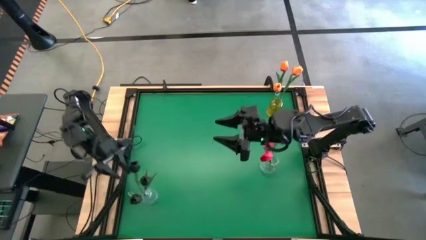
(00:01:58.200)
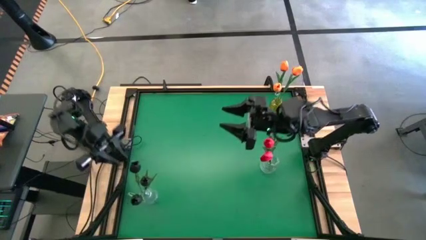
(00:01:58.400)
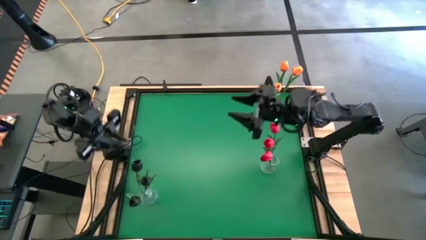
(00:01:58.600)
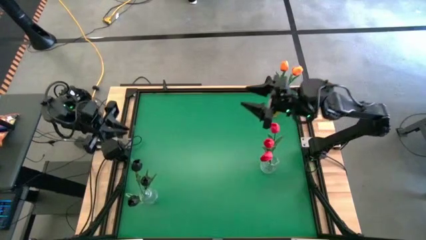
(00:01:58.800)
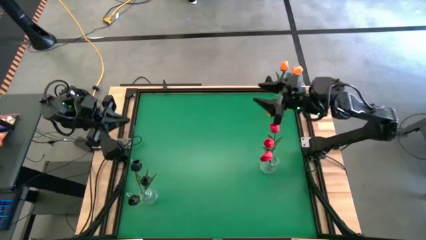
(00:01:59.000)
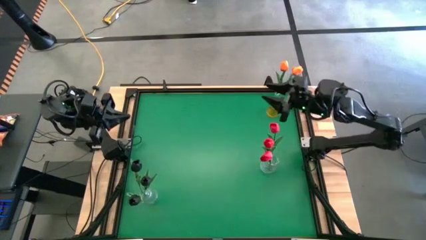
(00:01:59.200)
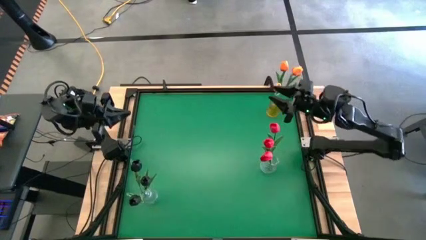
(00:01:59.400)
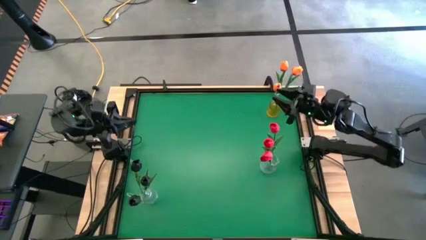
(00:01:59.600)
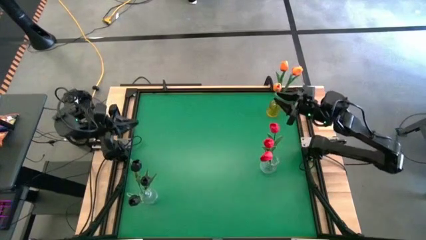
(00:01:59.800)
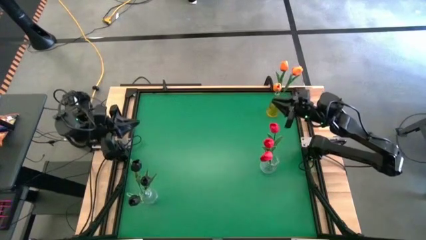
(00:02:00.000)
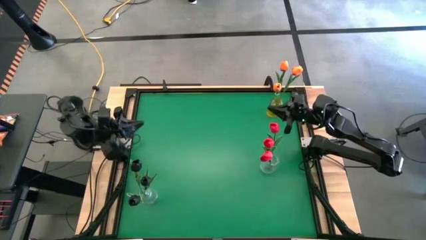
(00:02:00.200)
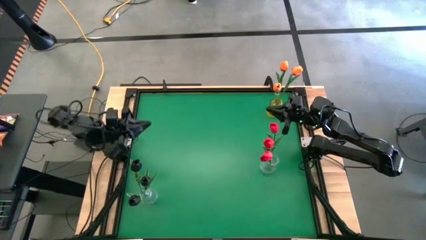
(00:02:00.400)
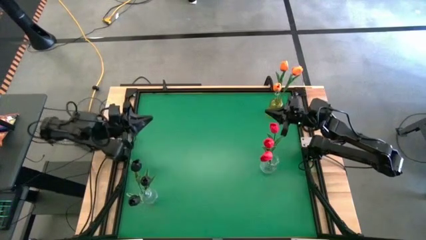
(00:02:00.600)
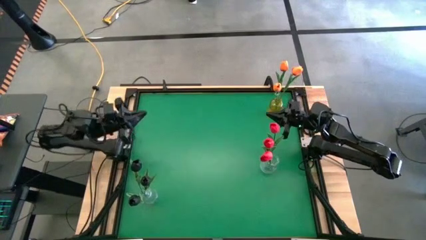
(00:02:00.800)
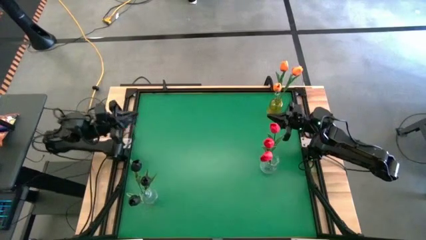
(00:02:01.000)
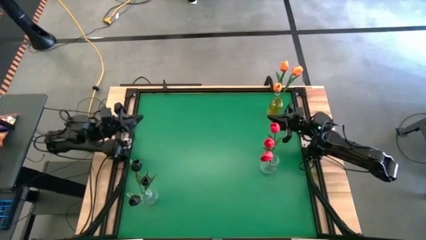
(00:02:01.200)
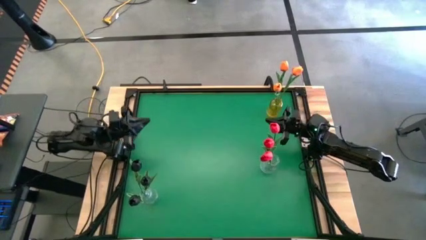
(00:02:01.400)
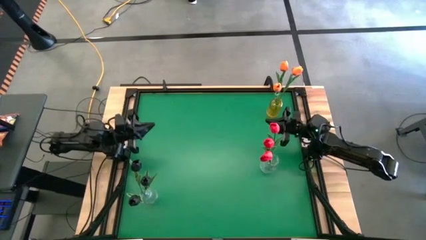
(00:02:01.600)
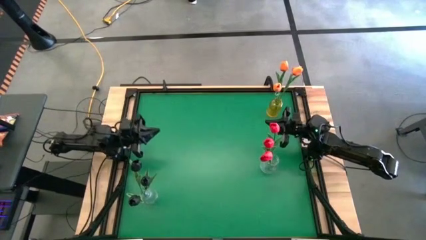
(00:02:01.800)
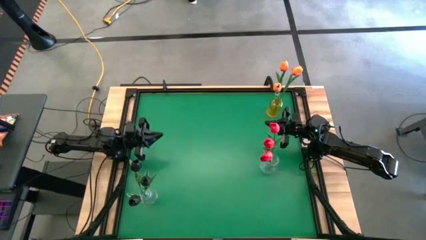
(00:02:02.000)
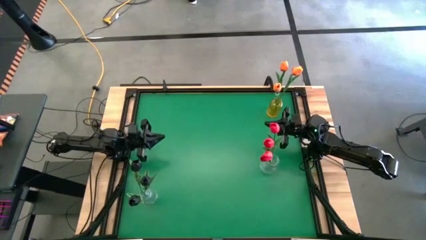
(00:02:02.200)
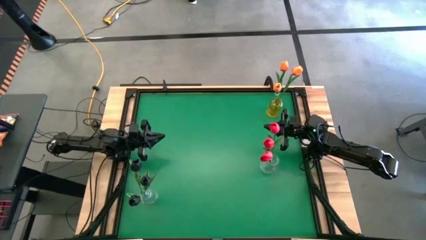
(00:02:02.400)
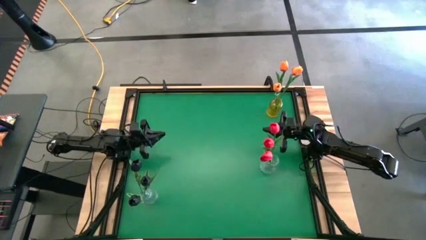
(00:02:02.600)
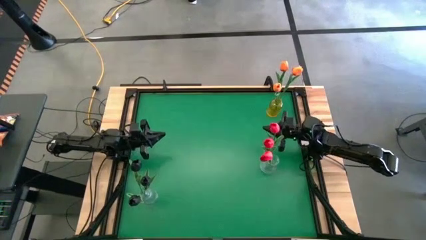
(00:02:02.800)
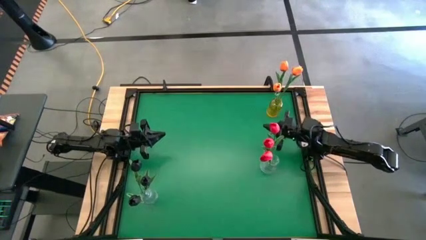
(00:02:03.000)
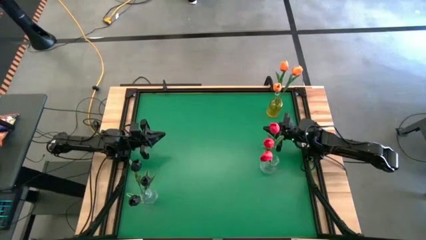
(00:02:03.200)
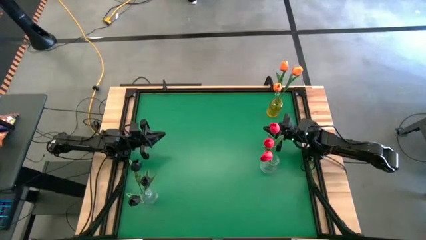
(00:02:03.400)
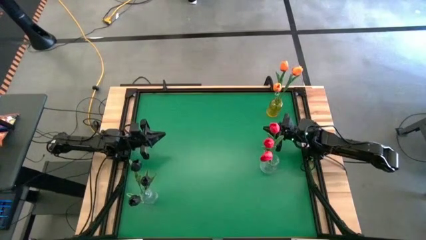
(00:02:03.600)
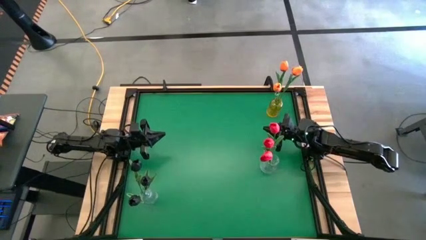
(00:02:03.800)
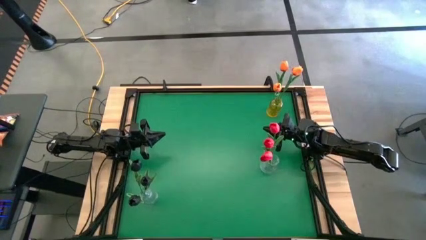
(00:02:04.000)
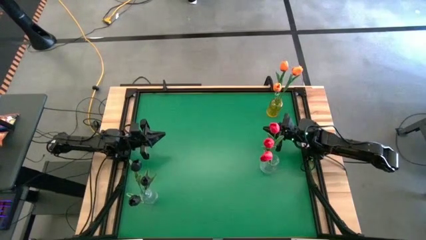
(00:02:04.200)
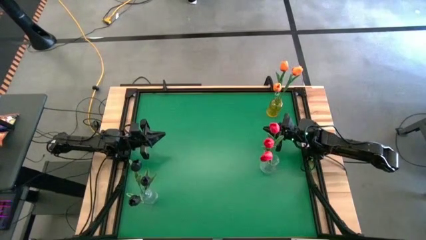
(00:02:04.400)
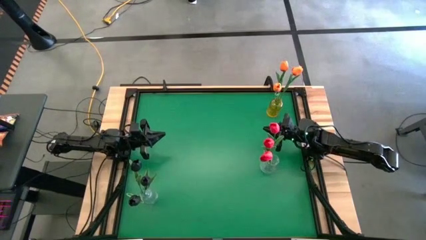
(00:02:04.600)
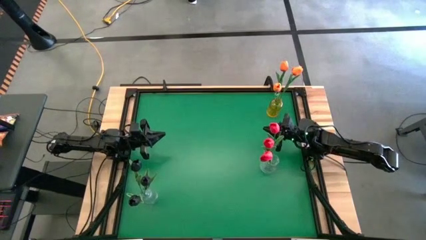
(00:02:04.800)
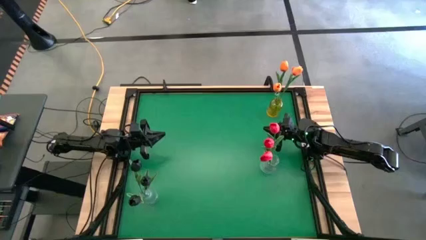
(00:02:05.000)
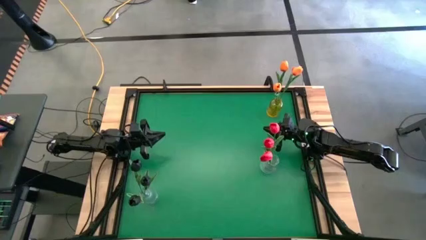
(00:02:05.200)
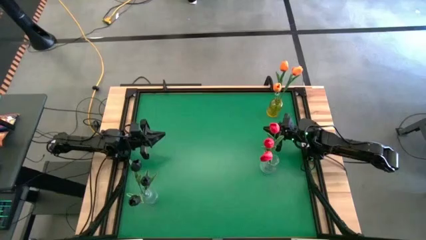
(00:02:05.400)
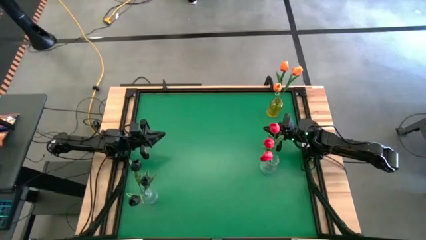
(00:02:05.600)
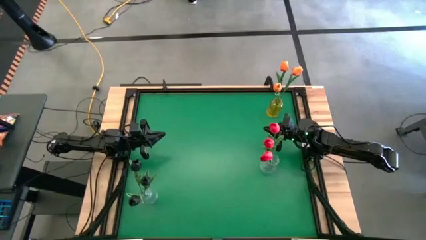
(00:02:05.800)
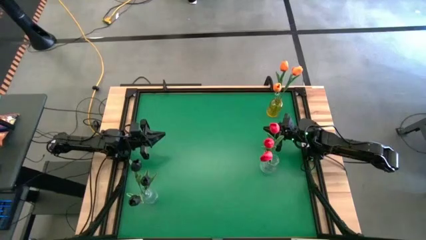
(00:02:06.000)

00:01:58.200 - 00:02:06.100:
Task: Sort flowers into vase by color
Return to Home Position

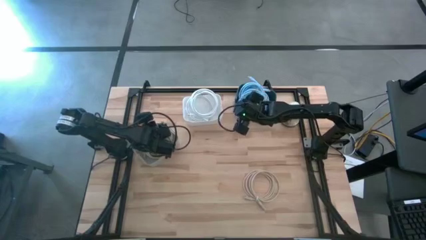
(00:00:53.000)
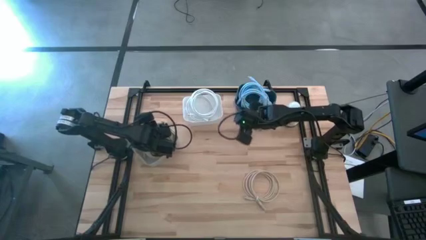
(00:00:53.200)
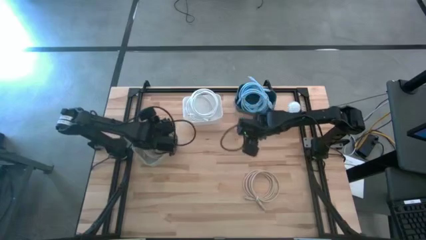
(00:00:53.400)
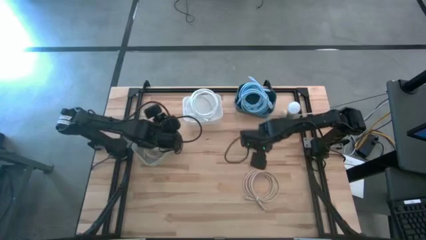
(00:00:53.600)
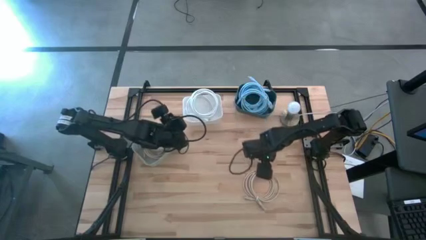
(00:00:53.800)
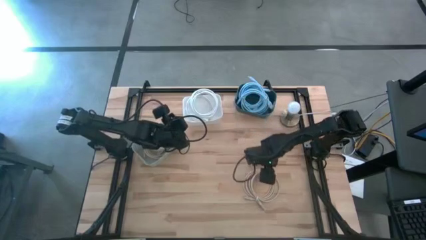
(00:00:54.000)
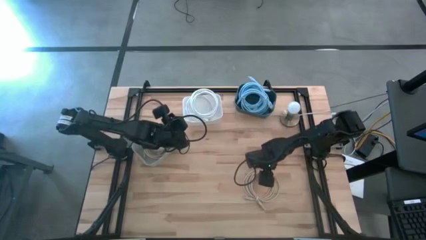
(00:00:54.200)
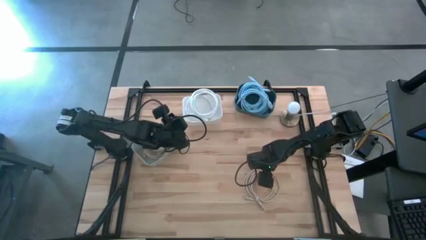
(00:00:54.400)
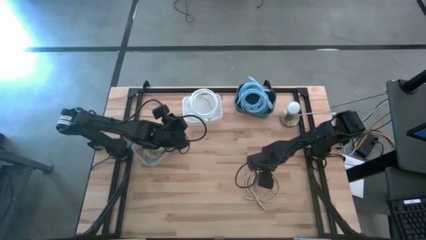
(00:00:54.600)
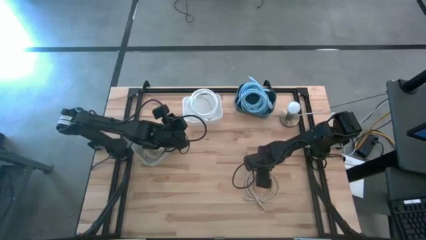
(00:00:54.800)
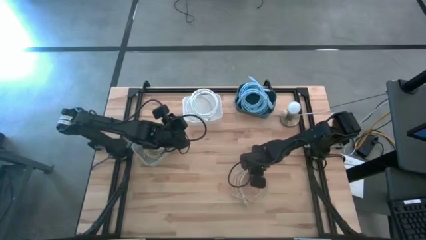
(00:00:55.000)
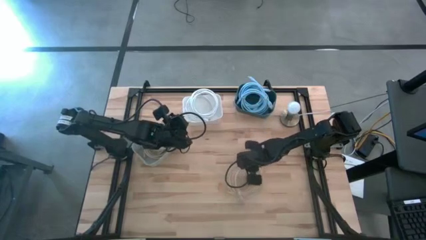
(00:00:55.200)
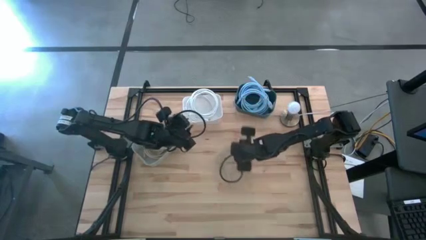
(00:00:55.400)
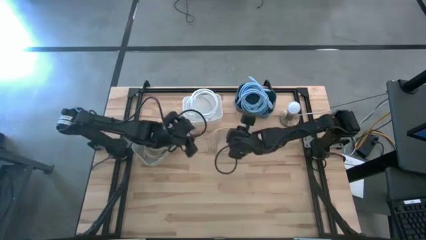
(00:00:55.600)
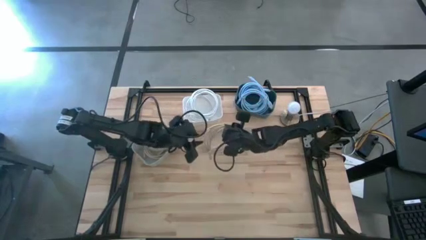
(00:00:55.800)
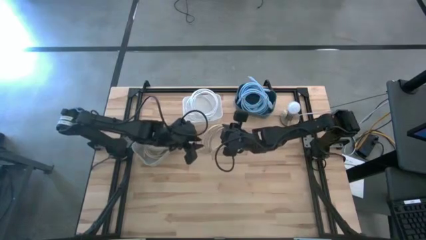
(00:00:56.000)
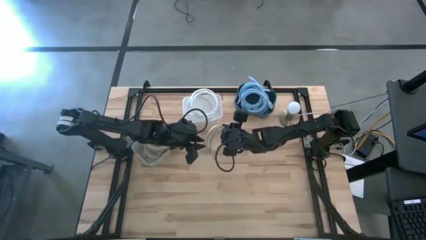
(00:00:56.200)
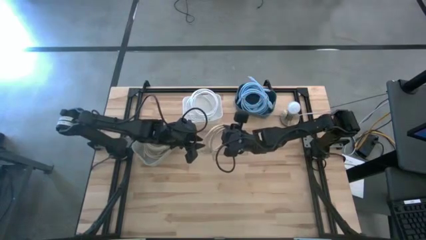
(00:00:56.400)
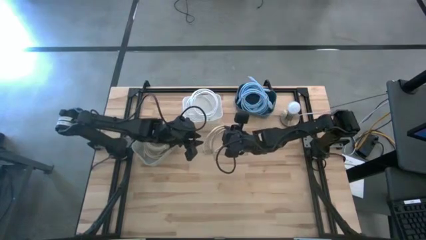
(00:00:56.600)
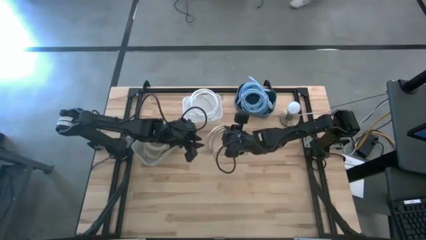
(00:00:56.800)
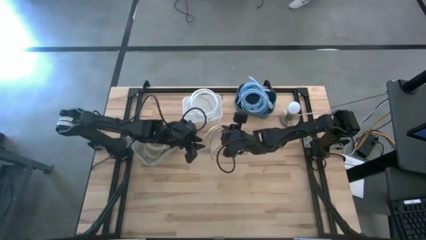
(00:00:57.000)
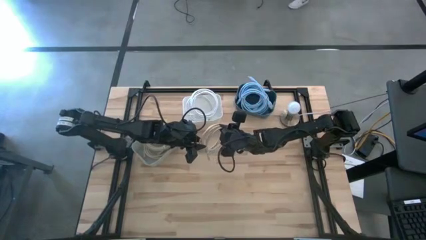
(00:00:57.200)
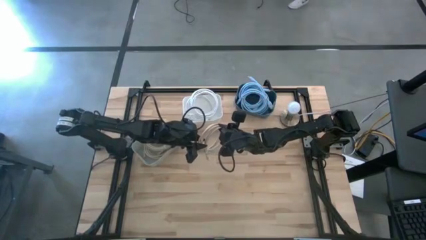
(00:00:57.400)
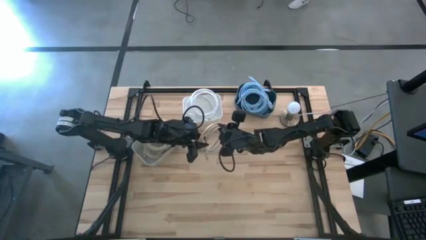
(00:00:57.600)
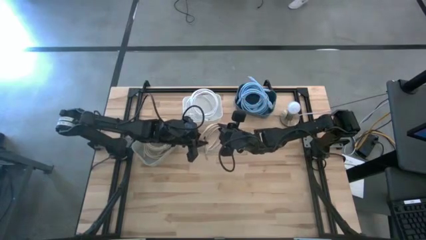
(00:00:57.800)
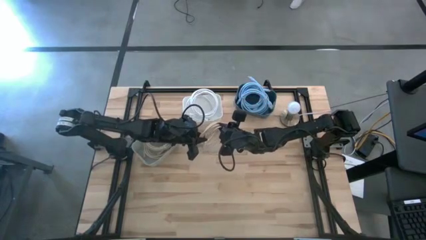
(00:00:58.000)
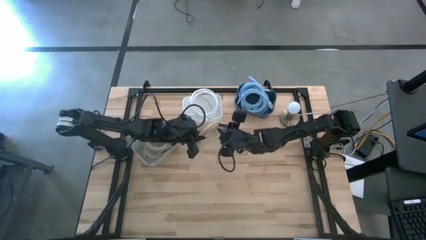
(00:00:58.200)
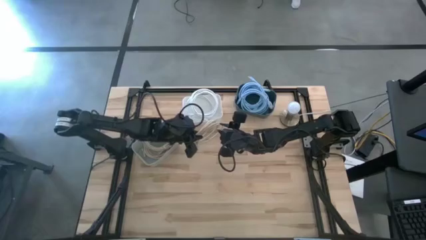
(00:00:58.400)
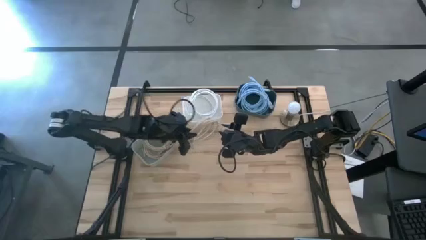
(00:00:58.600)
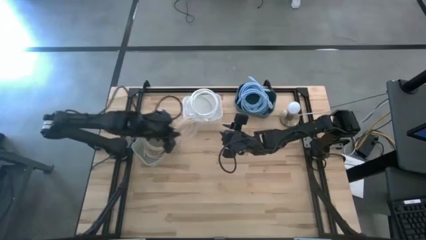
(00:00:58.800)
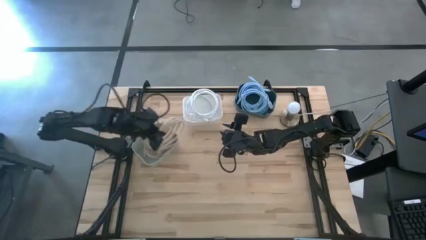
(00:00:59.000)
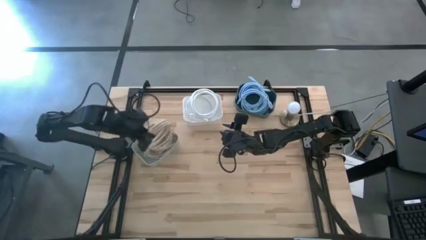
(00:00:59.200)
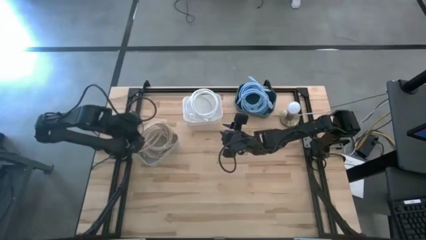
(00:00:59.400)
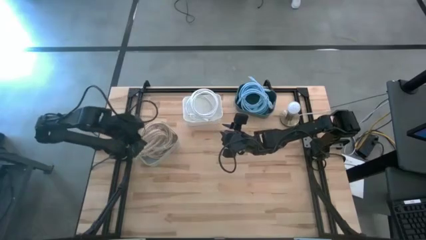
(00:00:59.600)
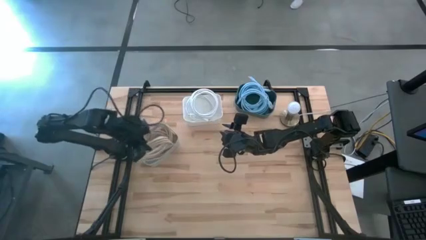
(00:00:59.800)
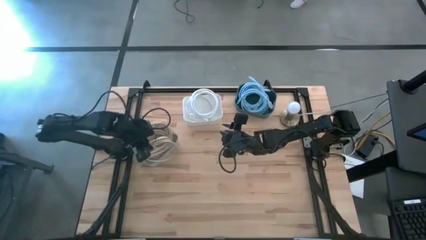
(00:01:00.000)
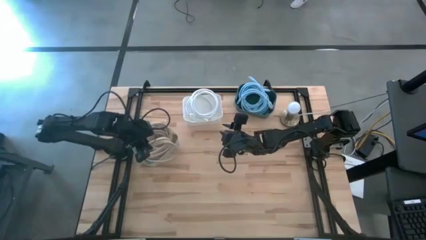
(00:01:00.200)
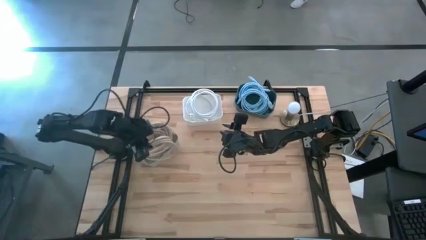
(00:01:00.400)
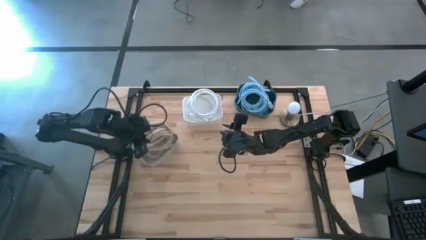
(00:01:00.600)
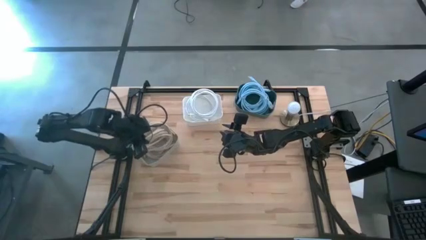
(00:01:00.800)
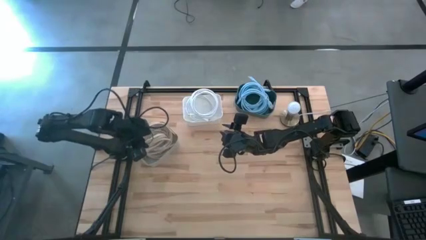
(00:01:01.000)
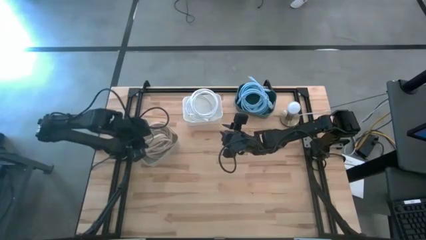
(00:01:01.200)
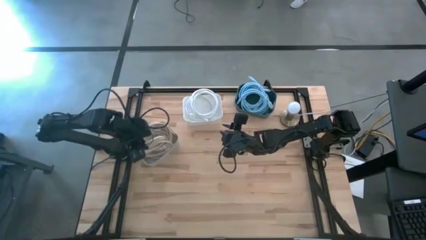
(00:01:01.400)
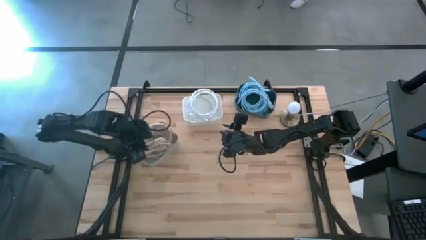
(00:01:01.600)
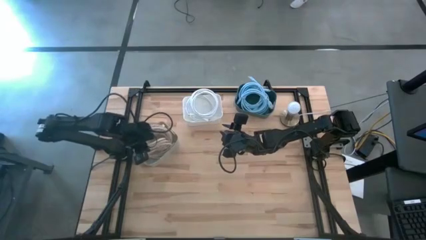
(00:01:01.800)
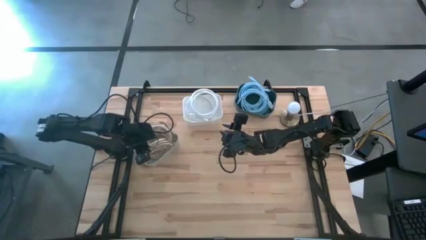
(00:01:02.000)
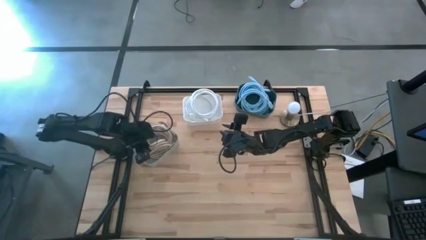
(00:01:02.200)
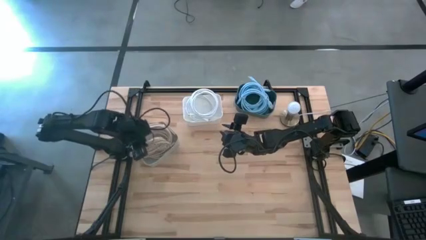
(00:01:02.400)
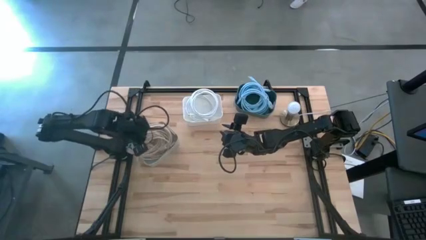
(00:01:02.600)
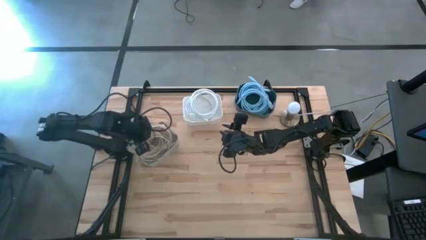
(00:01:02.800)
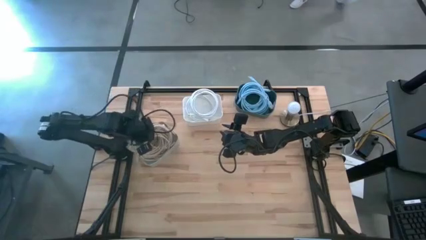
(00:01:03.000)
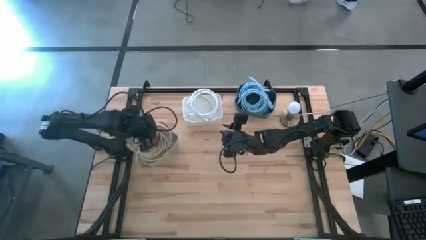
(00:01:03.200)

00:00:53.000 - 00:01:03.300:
Task: Pick & Place USB Port
Put the brown charger cable into the gray bin
